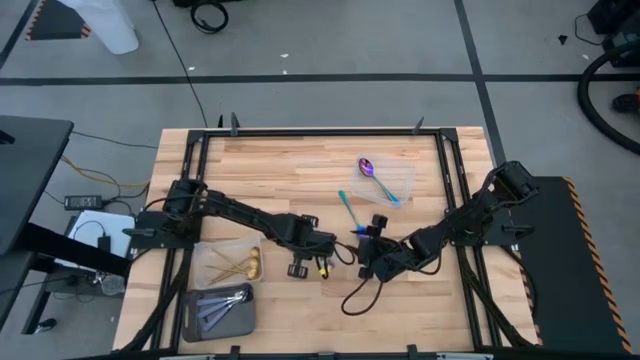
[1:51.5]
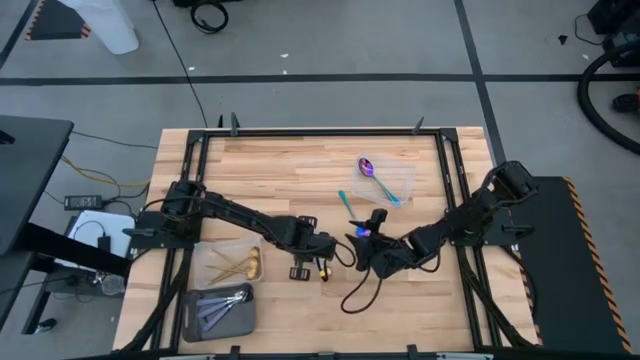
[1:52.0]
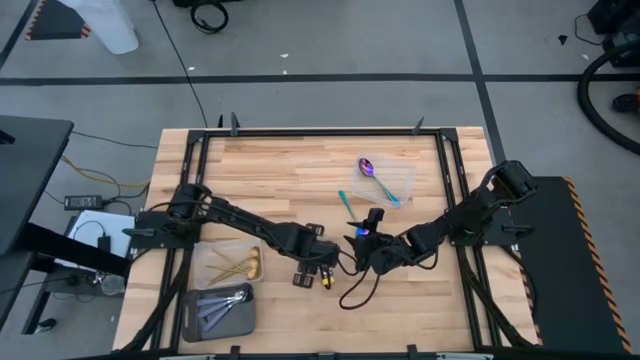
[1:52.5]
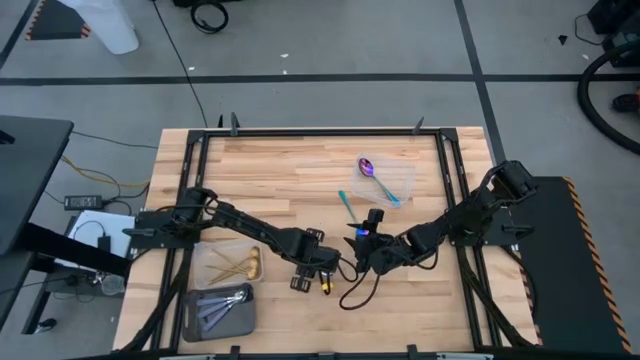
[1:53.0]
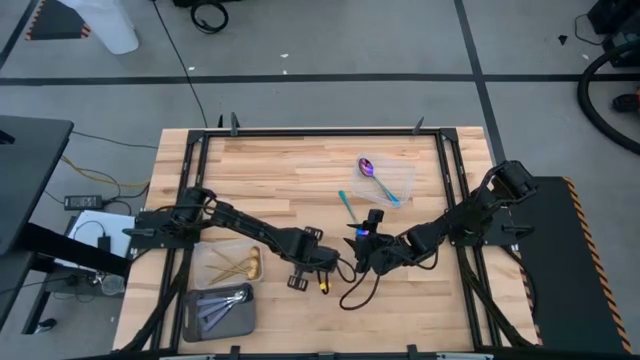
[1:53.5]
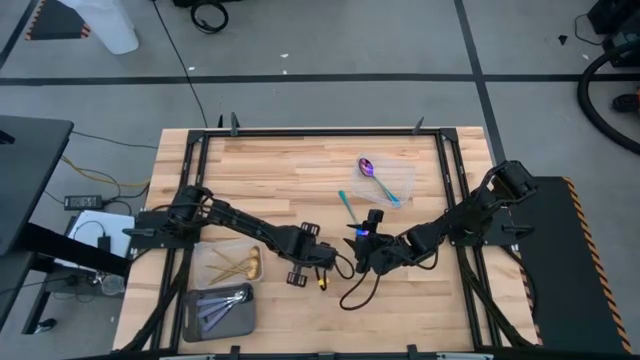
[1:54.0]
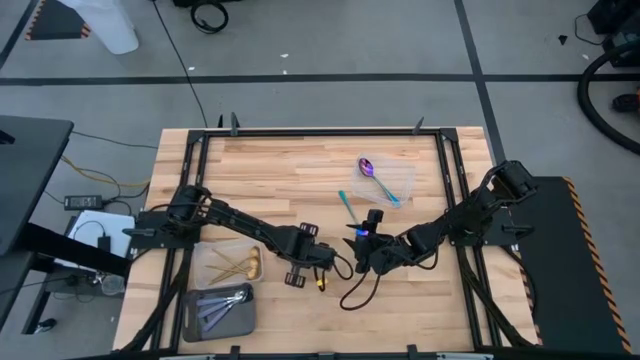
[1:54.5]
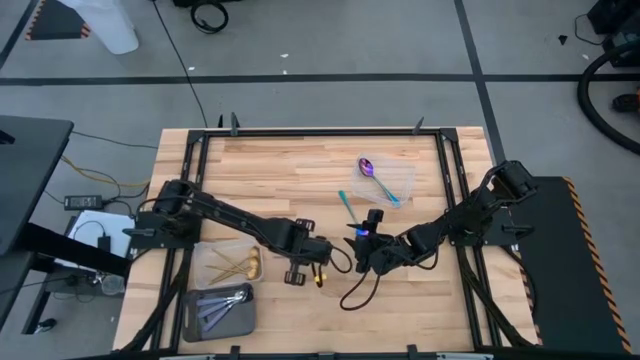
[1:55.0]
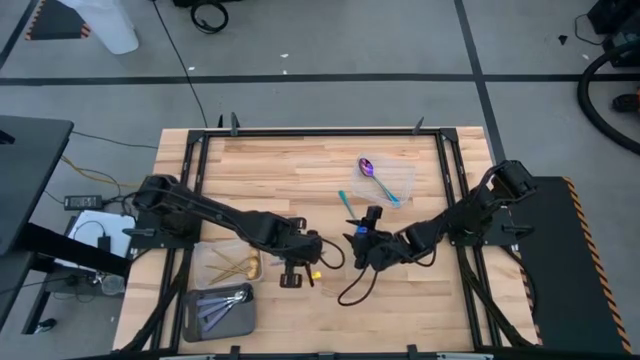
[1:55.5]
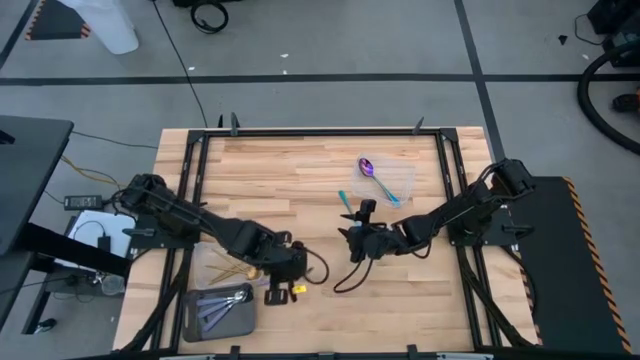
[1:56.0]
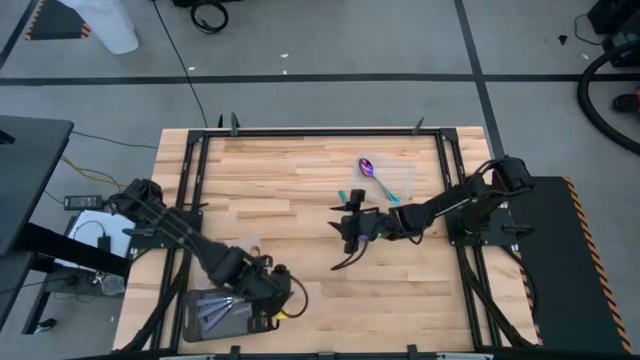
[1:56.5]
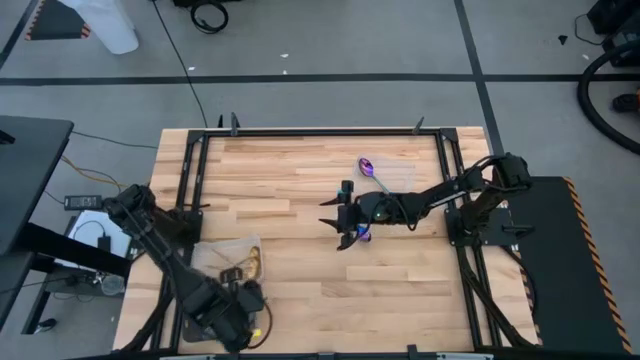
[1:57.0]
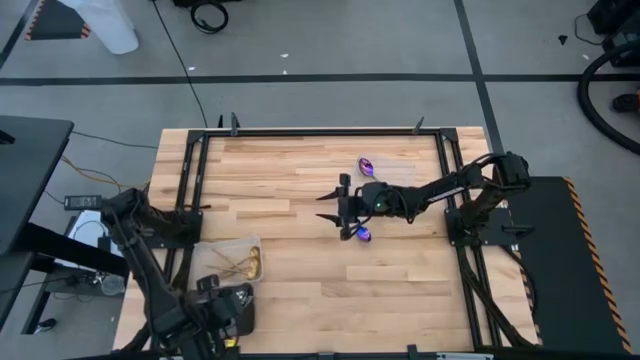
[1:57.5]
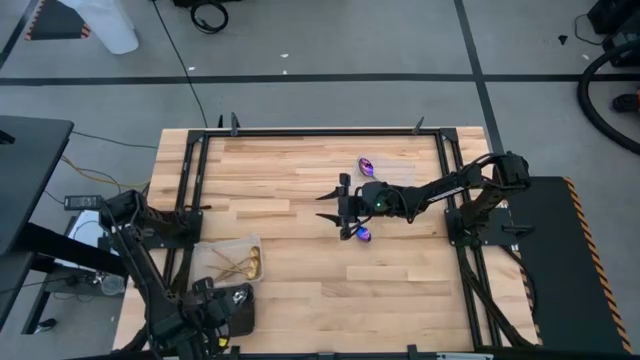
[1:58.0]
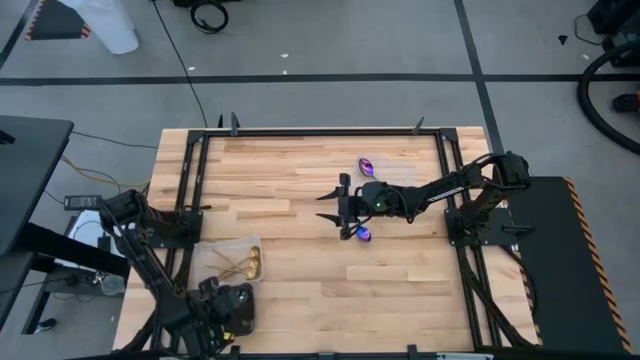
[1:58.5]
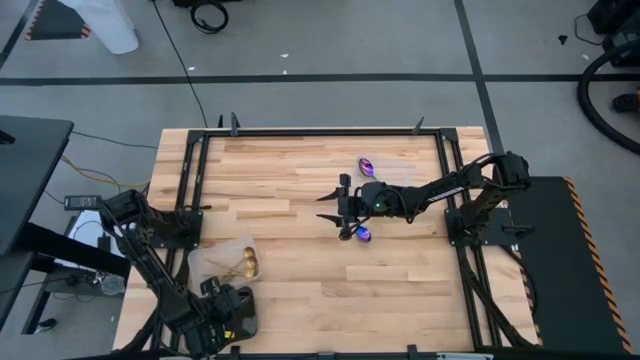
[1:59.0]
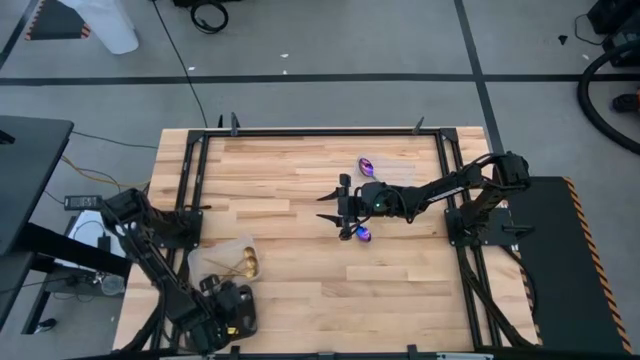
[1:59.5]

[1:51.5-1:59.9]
Task: Sort silverware by color (type)
Put the purple spoon into the black bin

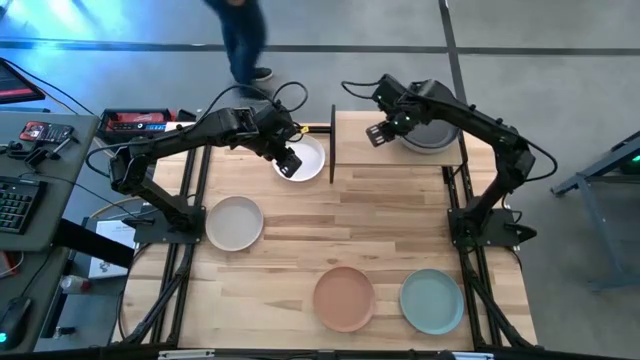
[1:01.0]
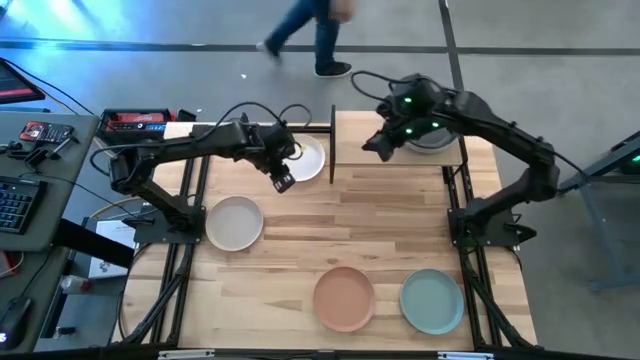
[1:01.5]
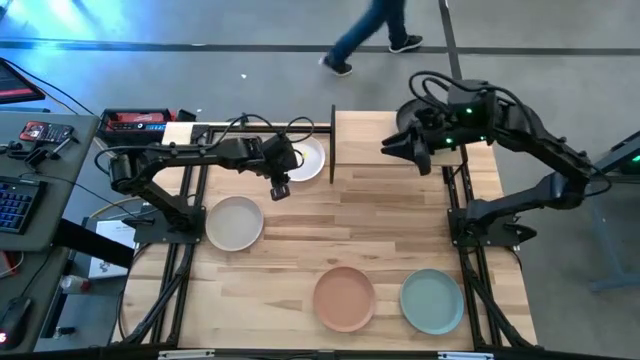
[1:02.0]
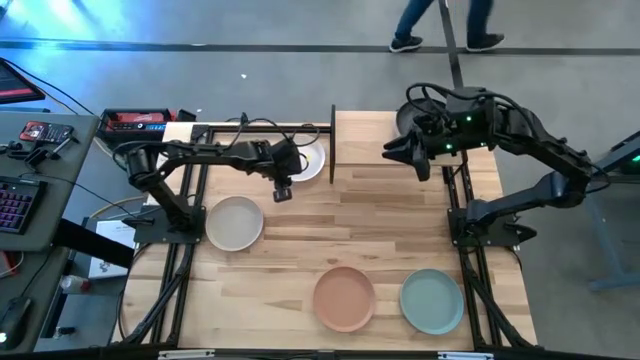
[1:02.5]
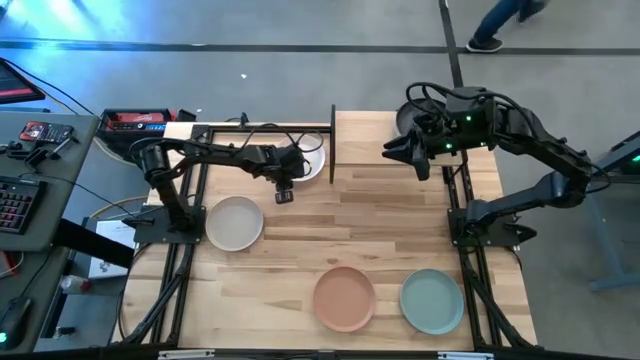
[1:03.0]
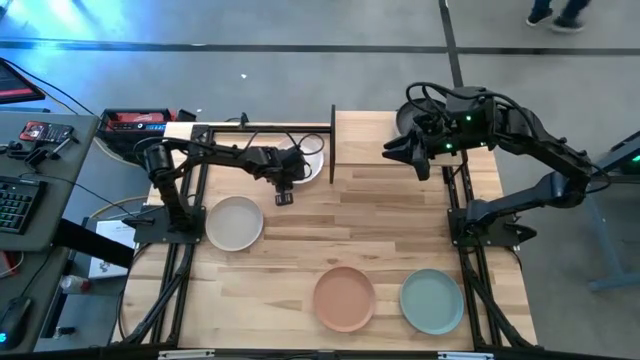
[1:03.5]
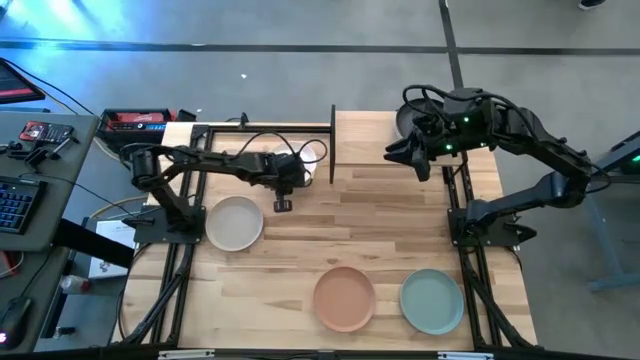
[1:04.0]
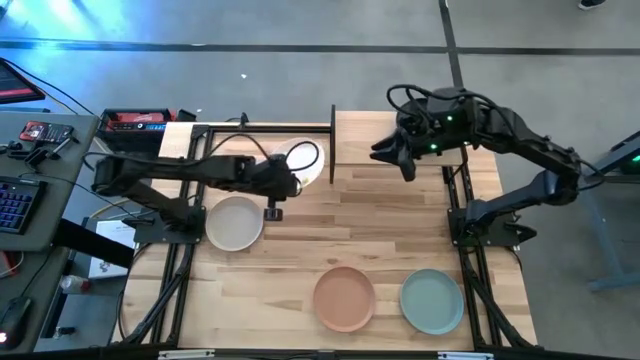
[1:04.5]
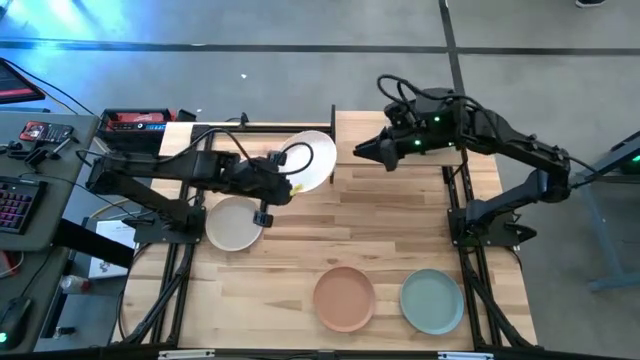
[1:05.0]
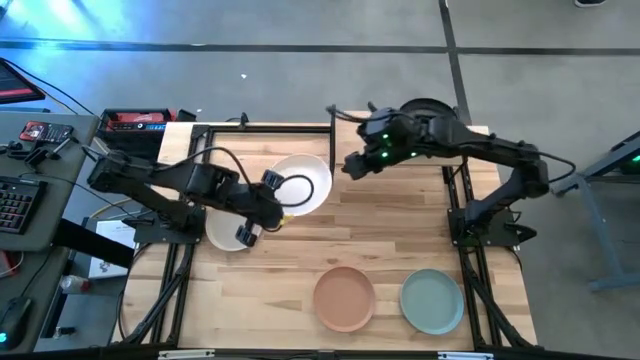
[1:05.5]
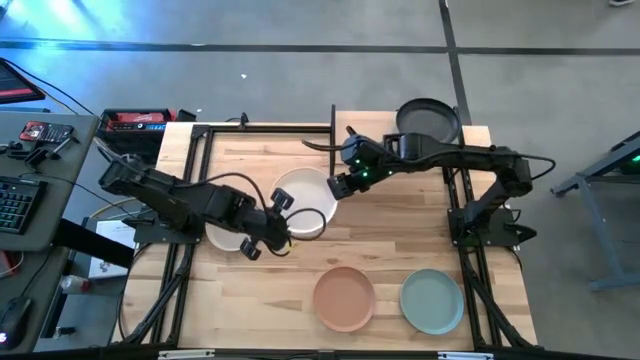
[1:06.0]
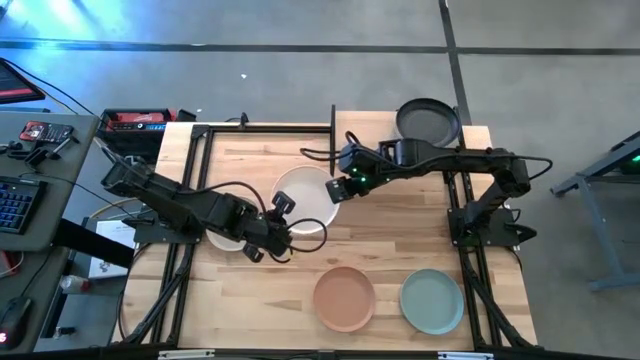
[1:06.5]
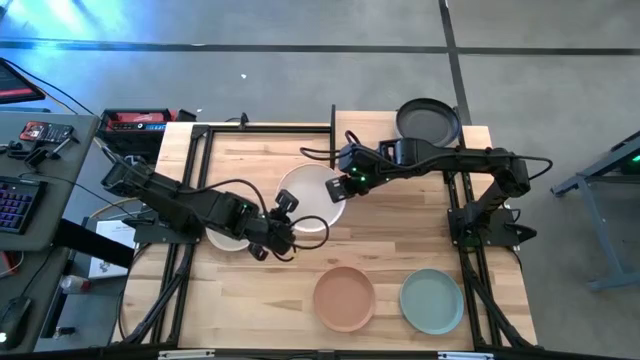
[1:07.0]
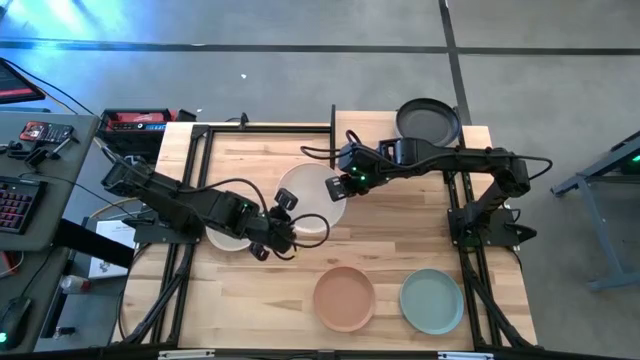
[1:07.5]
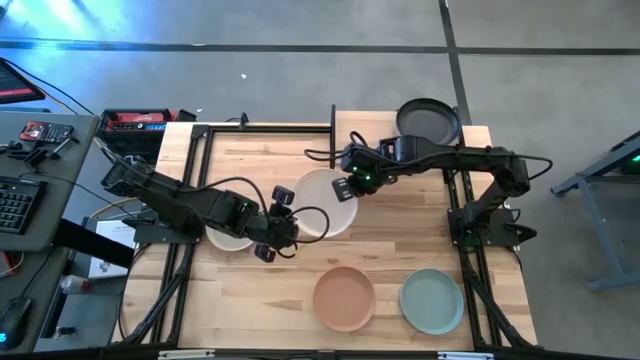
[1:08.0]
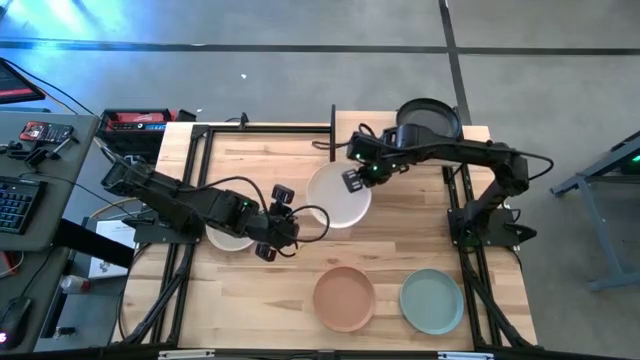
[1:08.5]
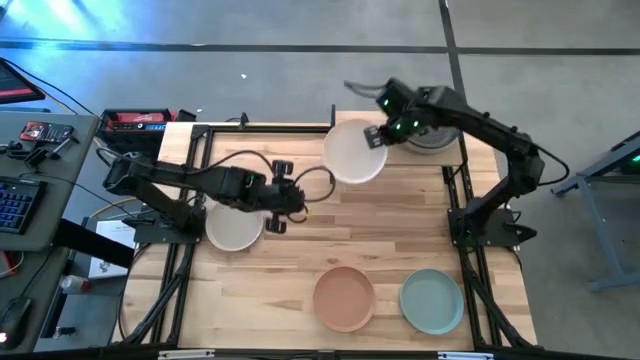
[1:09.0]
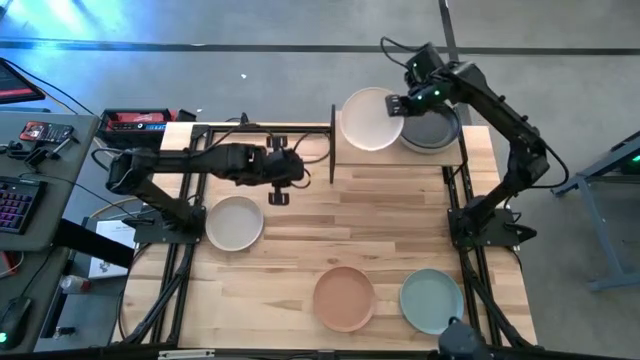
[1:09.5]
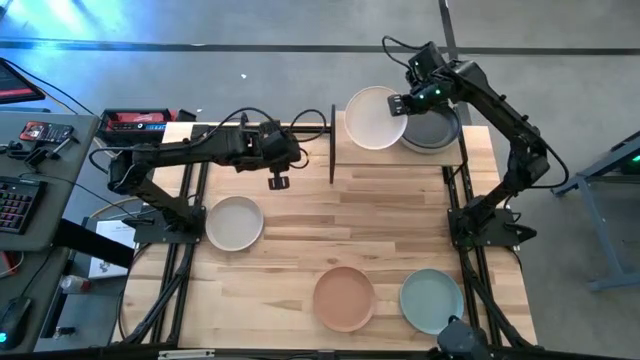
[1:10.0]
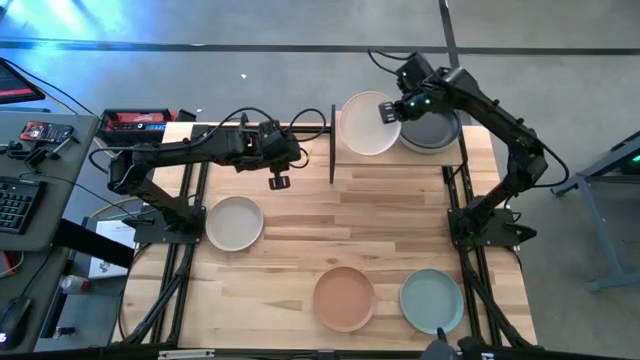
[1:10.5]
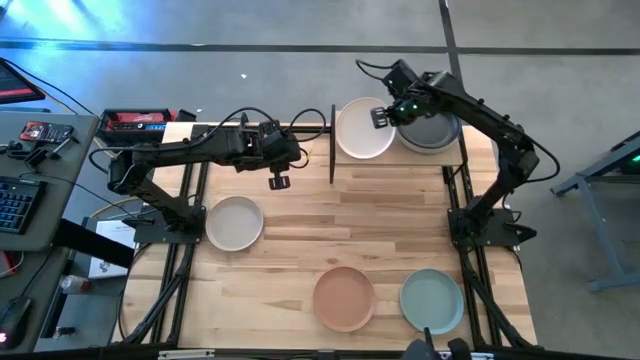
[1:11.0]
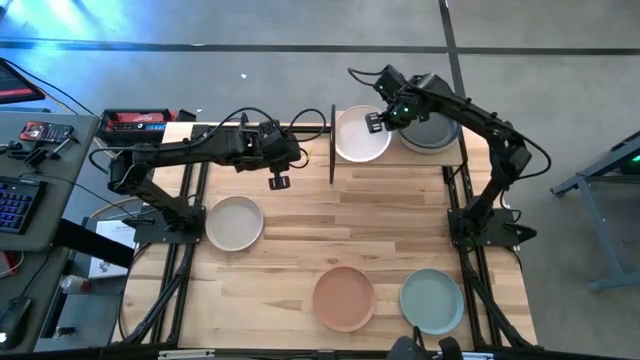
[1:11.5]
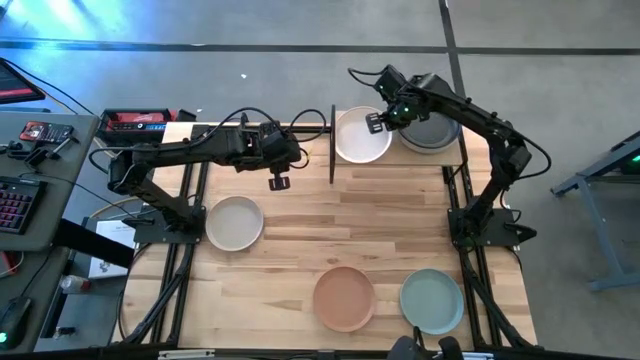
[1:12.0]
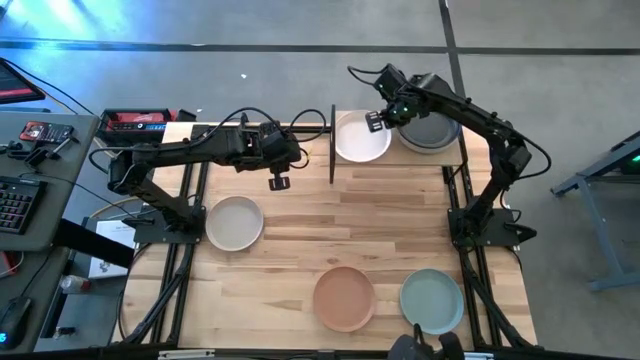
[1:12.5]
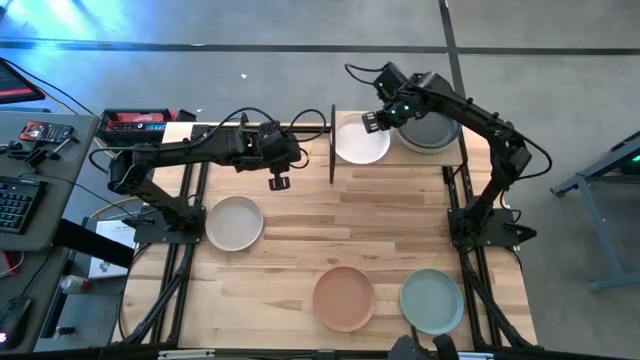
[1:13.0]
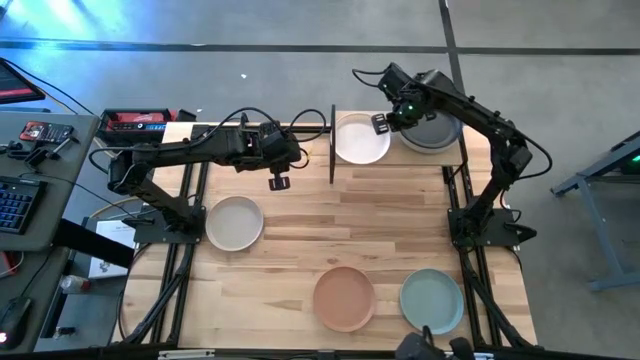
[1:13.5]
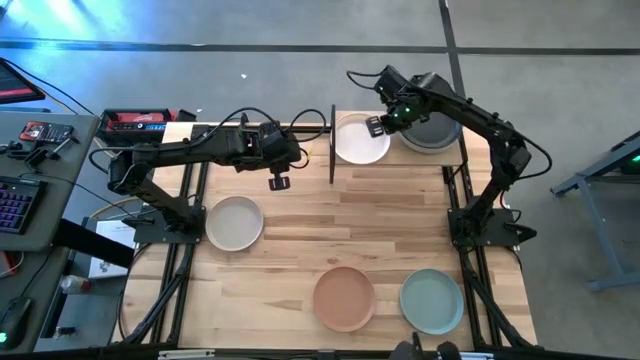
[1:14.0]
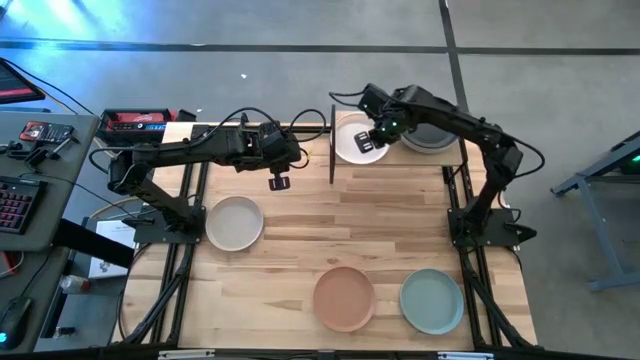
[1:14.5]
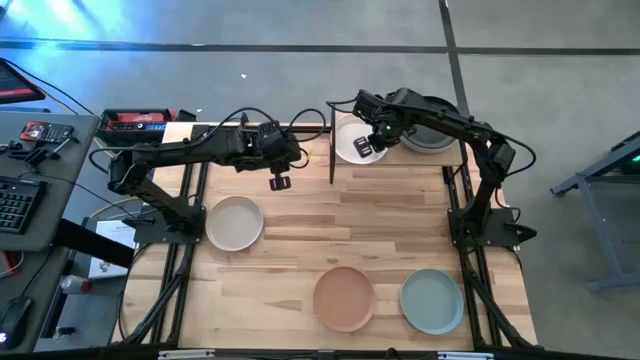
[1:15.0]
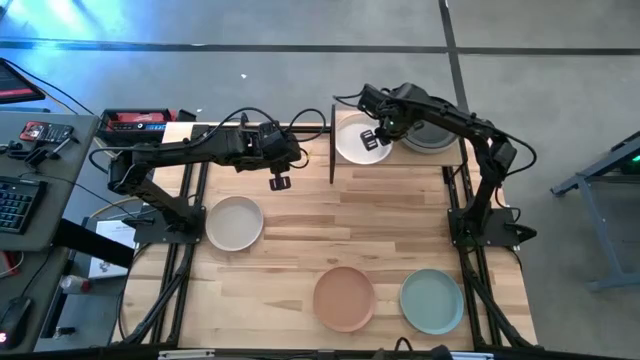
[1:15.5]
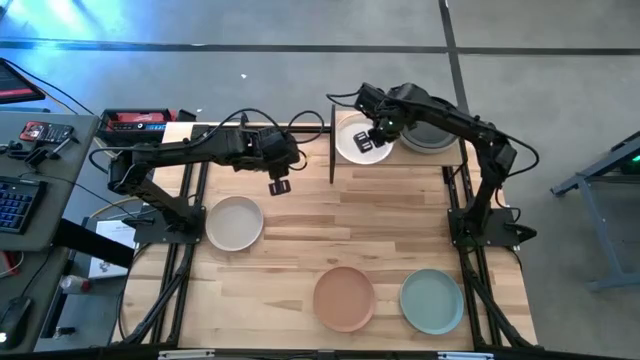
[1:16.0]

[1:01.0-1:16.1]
Task: Place and stack plates onto a shelf
Put the white plate on the shelf
